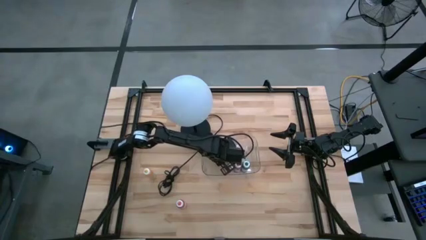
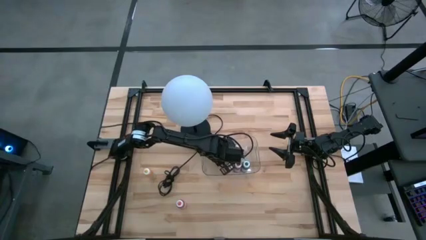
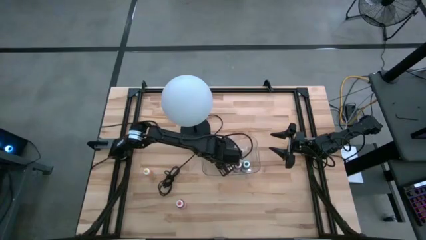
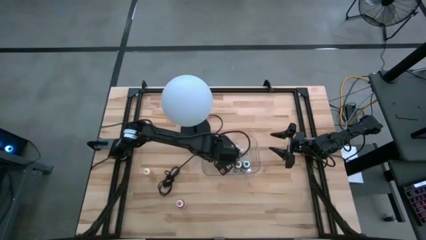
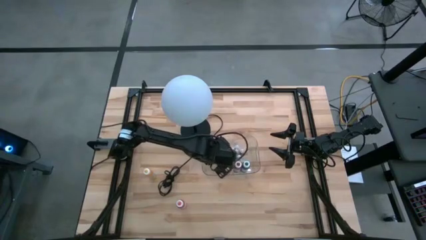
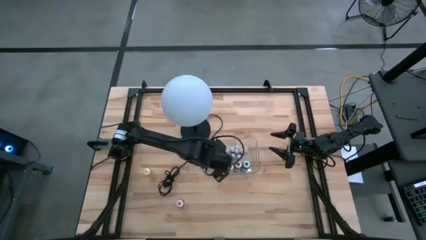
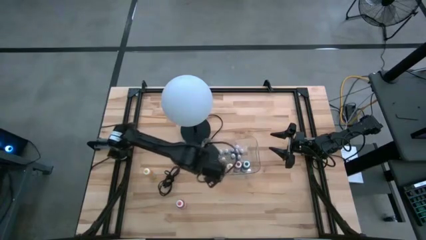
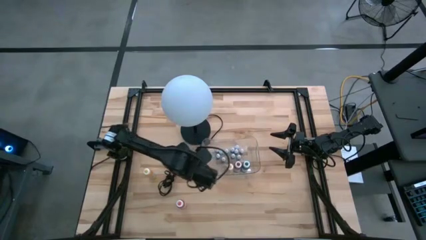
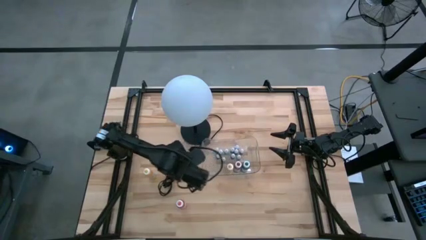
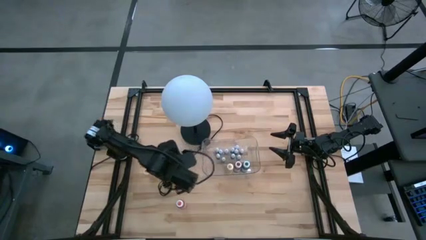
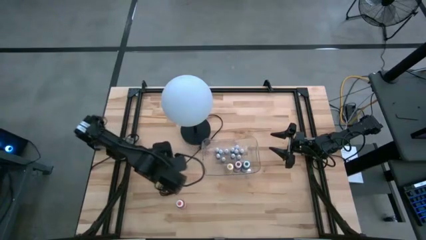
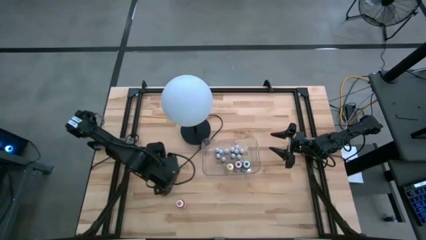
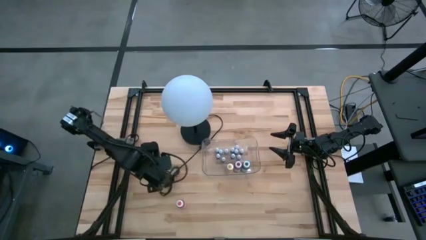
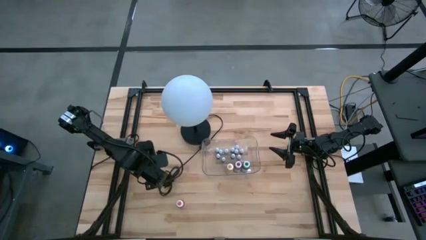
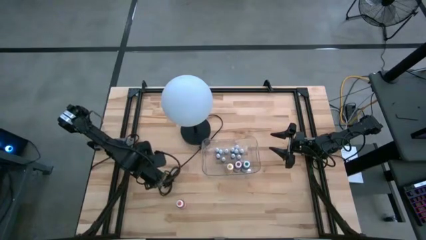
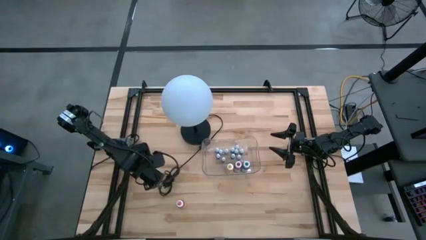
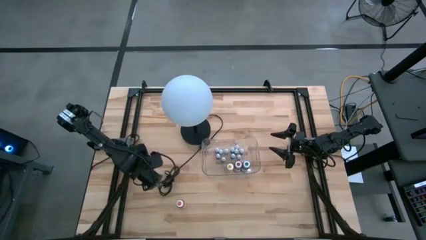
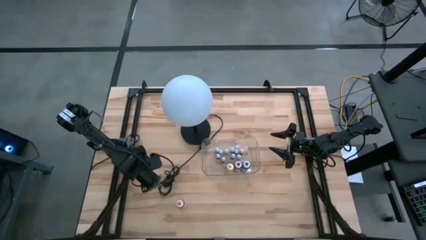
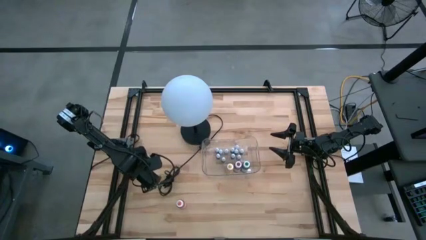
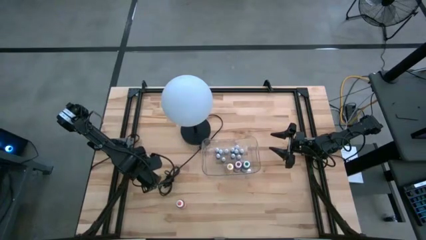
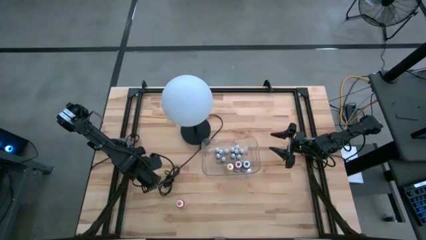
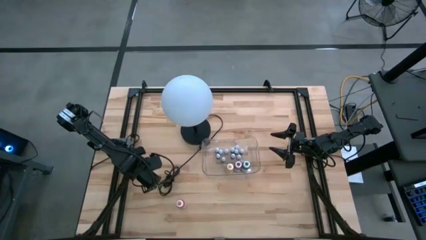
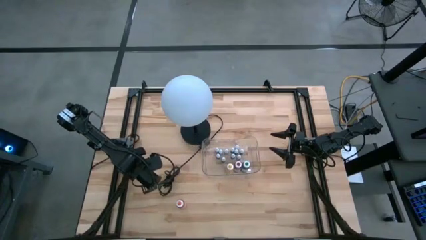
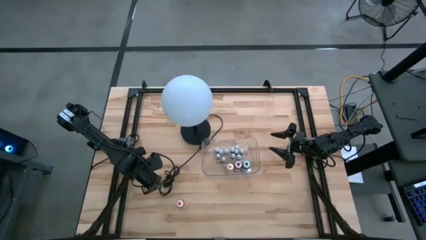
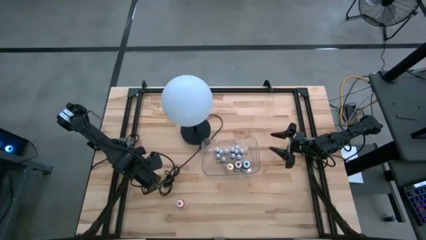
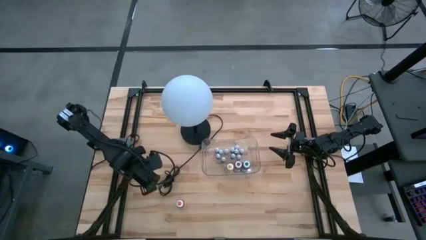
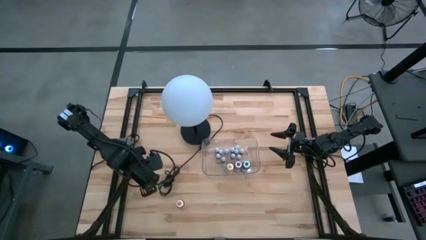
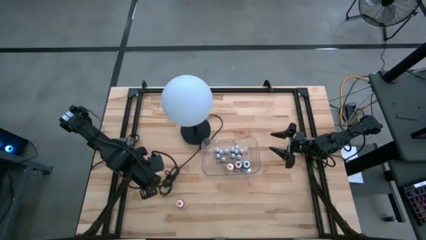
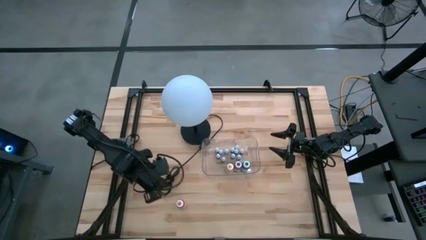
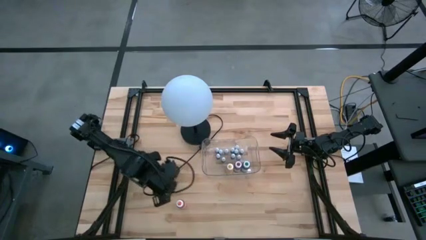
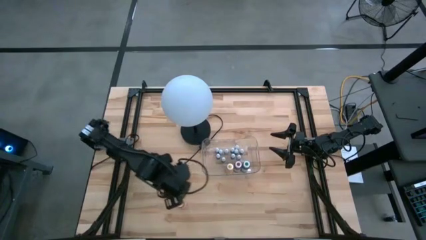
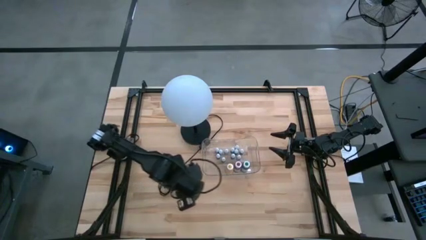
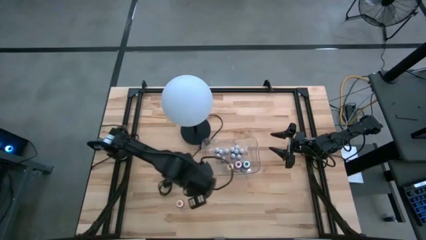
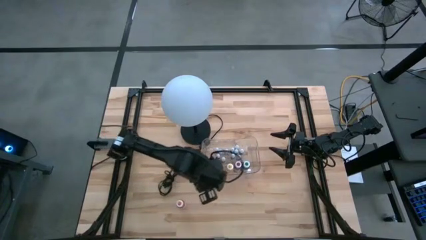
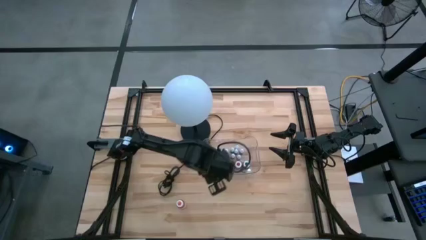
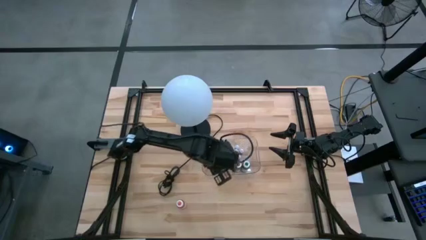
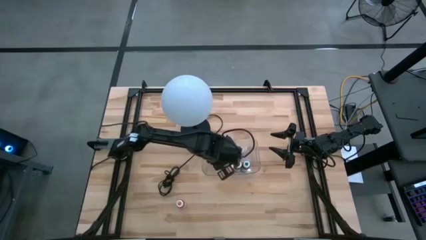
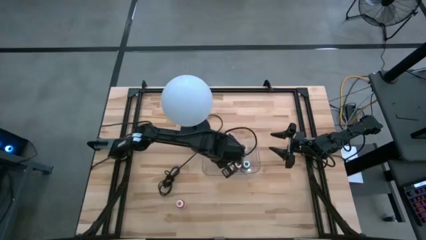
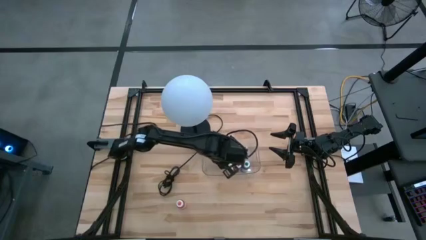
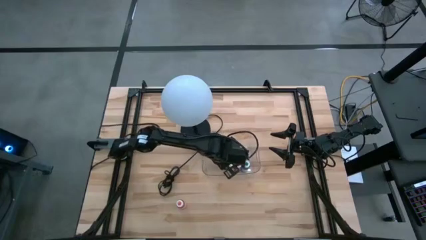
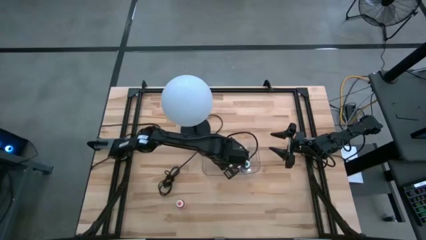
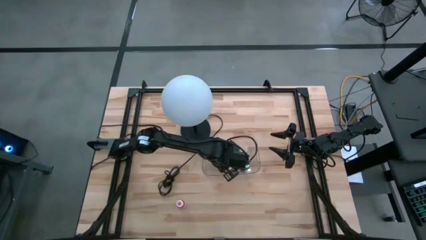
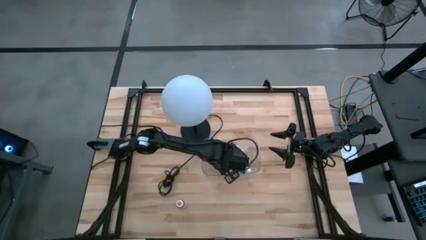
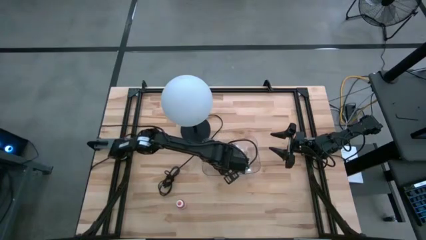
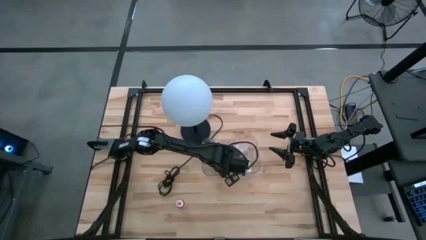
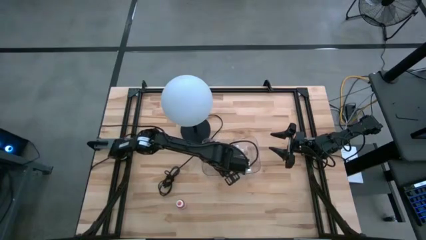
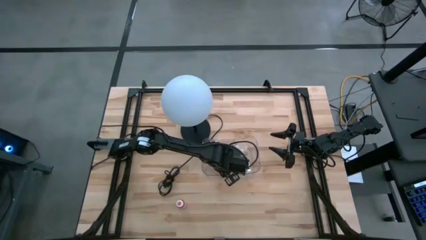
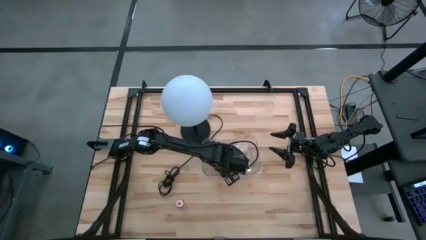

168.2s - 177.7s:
Task: Pick & Place food coloring
Put the large yellow food coloring bottle into the transparent bin
